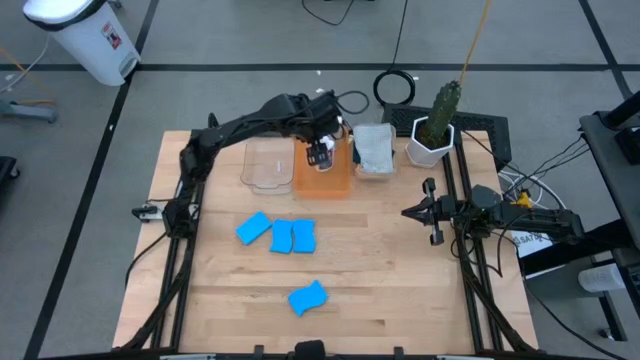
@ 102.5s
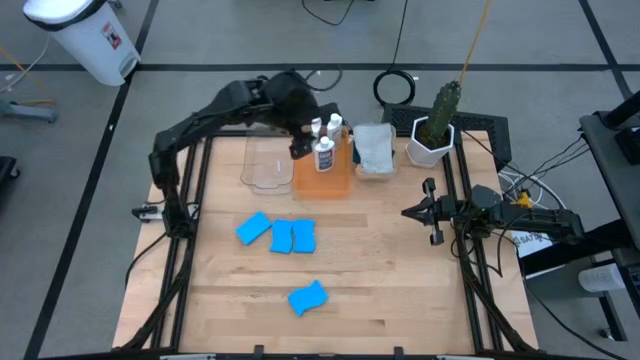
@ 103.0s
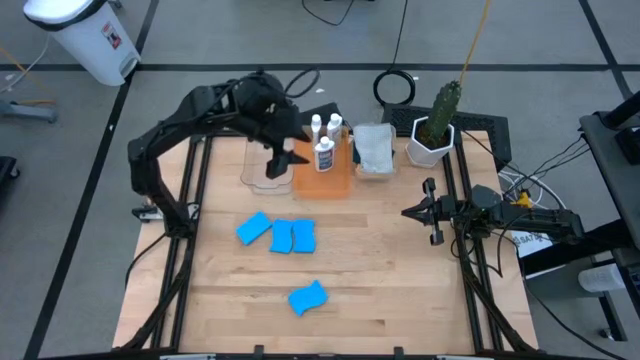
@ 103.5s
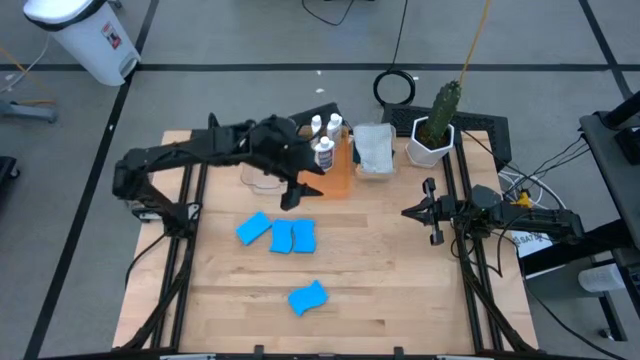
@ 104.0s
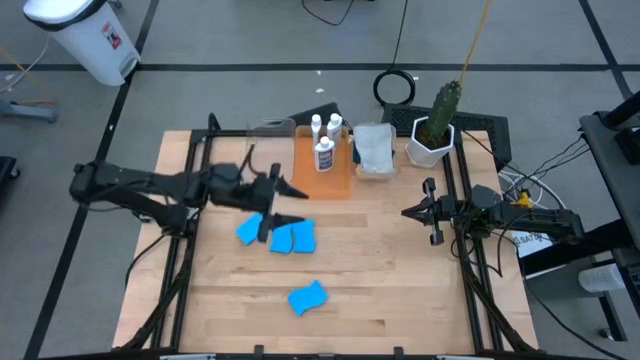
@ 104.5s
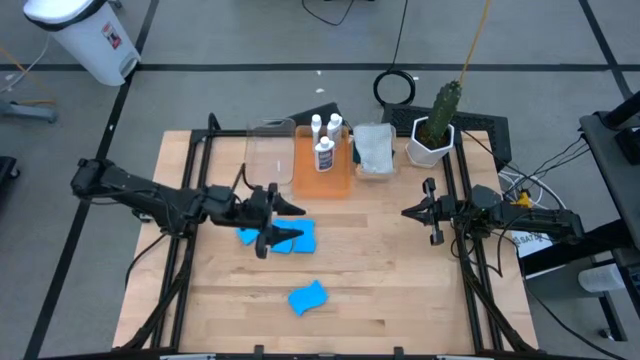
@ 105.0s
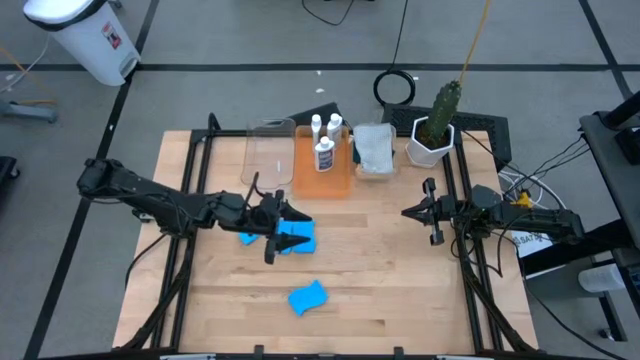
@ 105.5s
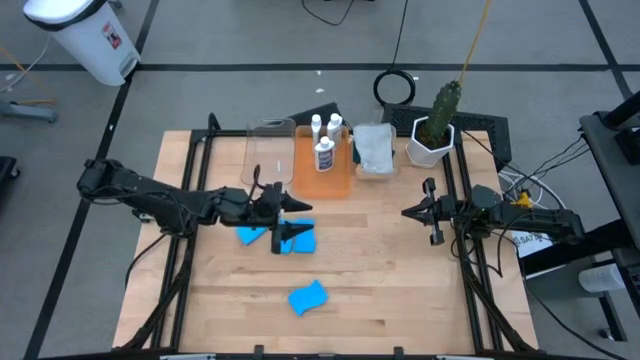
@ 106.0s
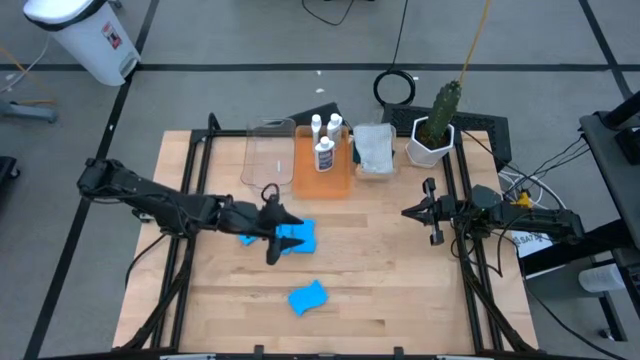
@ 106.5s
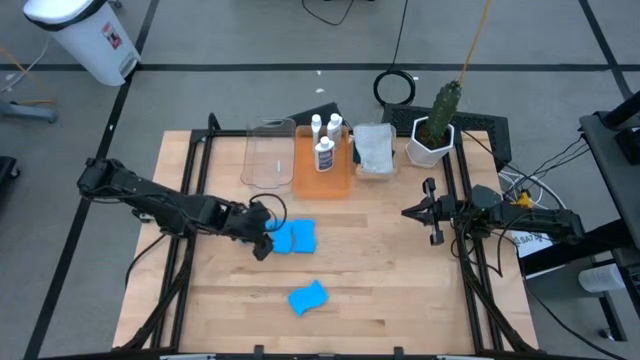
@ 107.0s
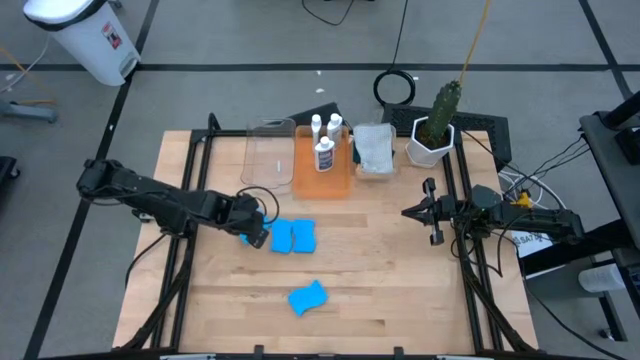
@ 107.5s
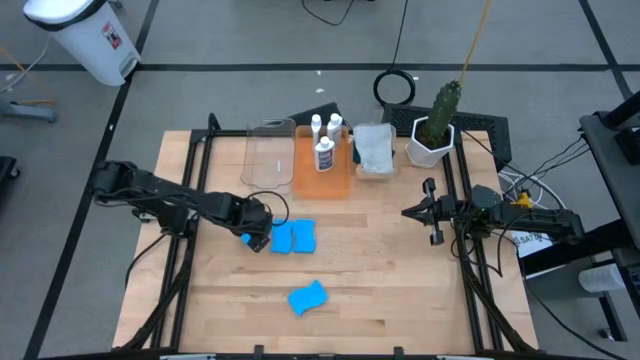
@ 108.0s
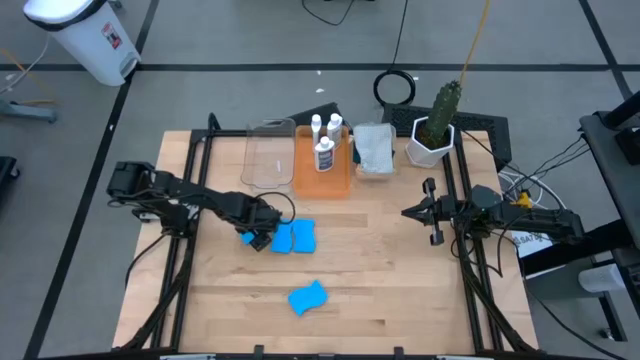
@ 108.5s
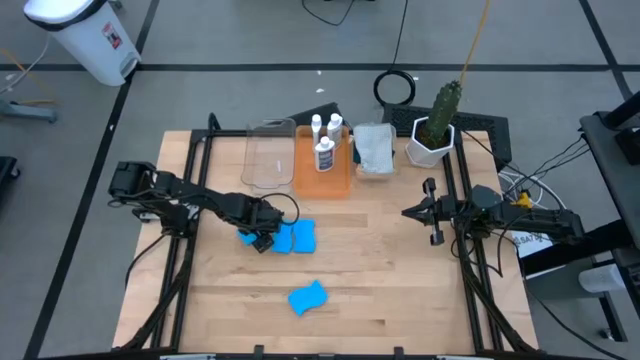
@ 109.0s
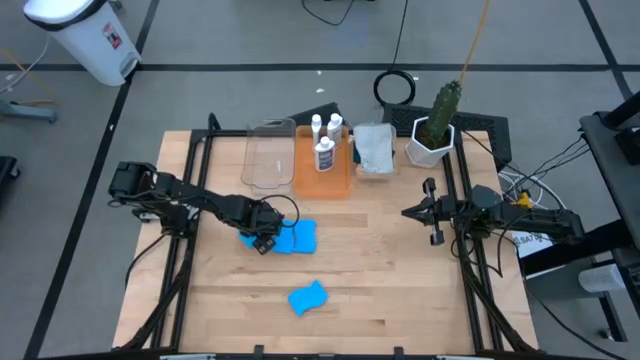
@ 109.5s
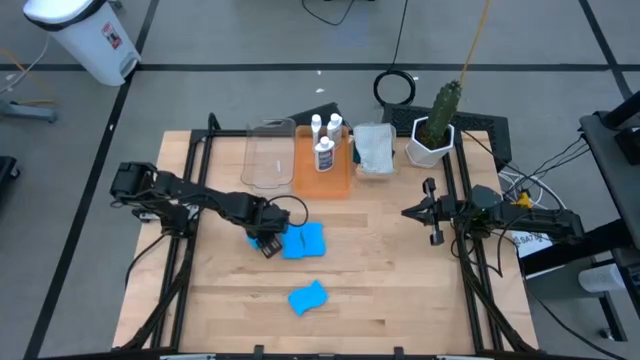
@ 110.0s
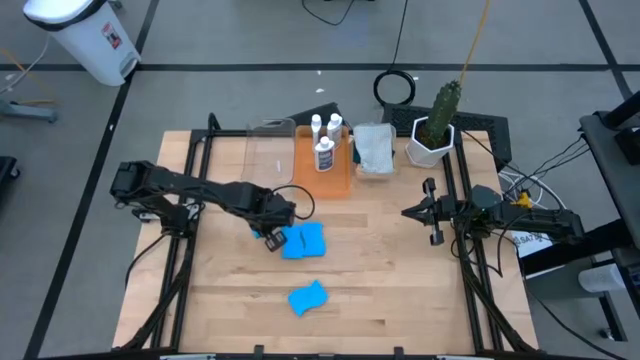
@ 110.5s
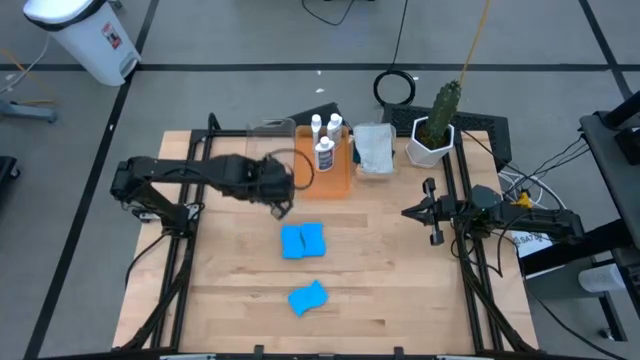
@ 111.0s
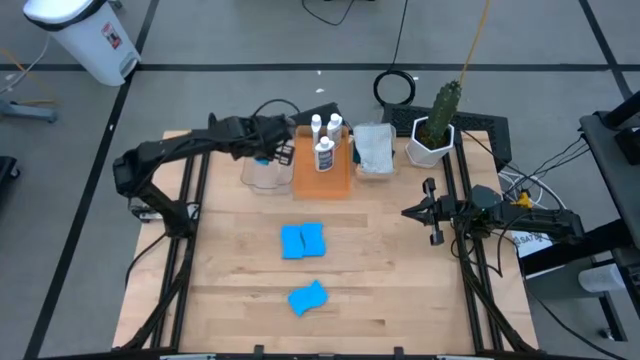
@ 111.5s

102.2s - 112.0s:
Task: Pick & Place Kitchen Items
Put the blue sponge into the transparent bin

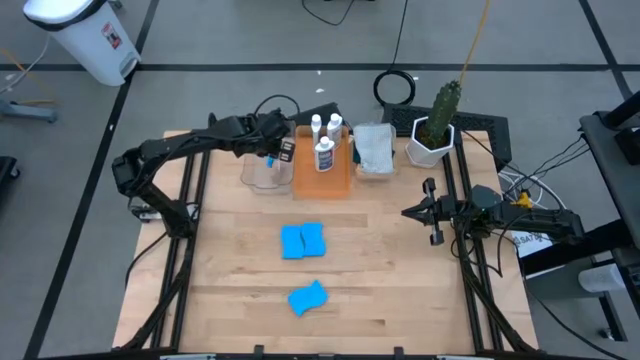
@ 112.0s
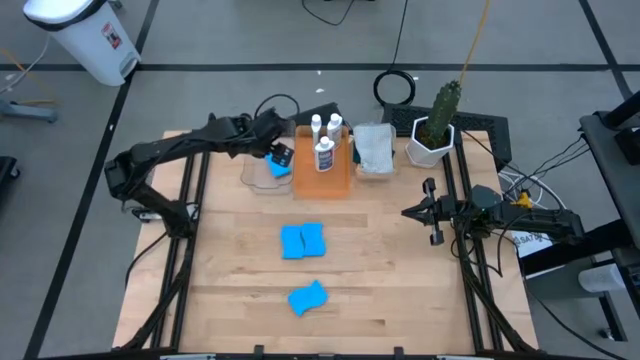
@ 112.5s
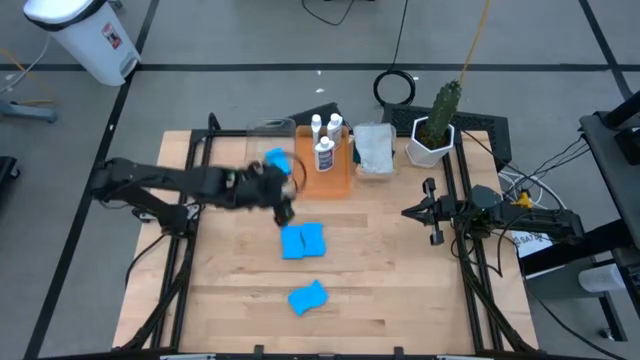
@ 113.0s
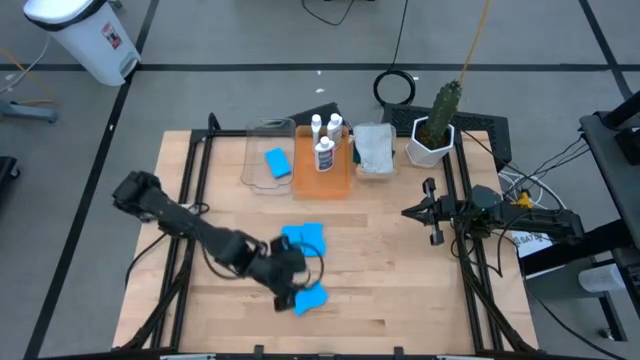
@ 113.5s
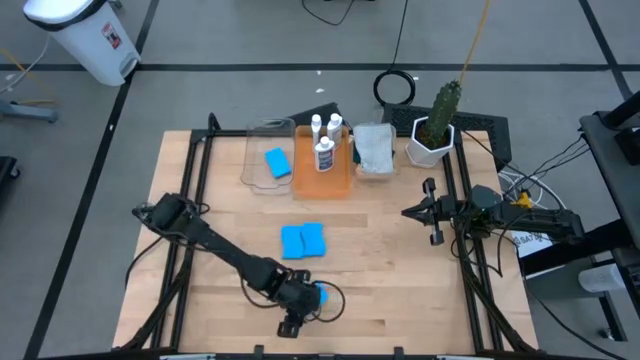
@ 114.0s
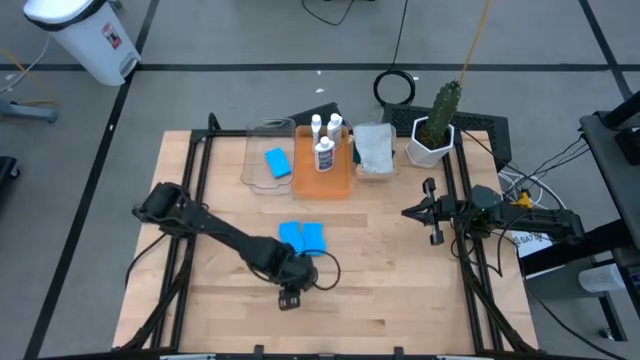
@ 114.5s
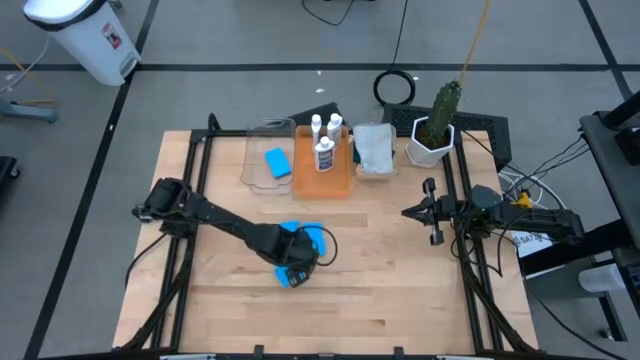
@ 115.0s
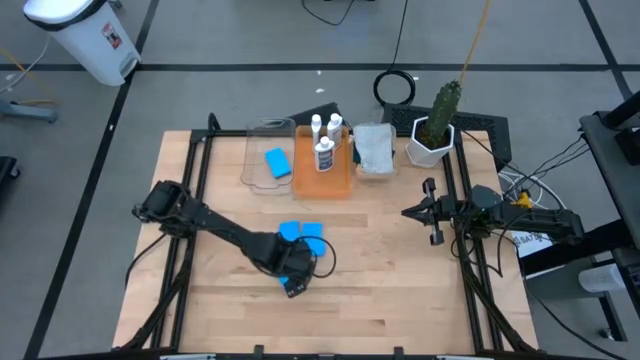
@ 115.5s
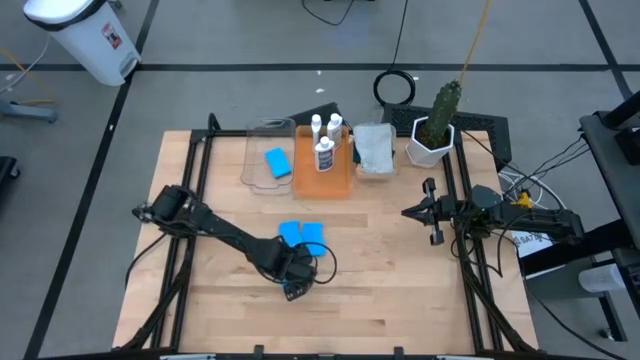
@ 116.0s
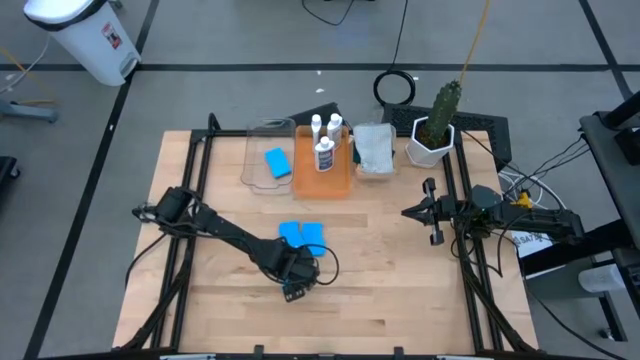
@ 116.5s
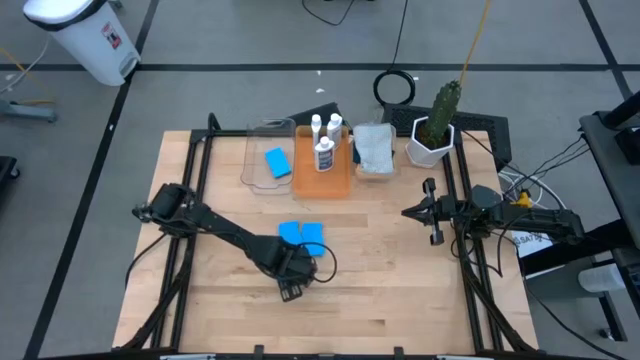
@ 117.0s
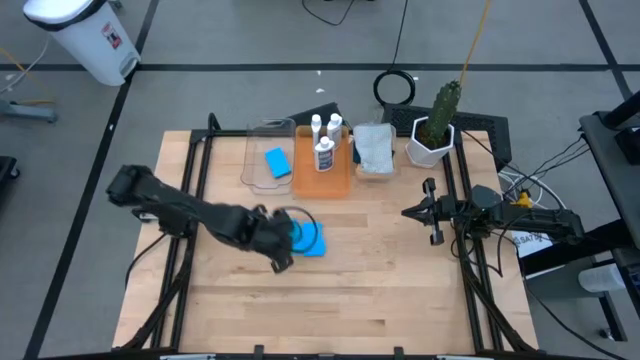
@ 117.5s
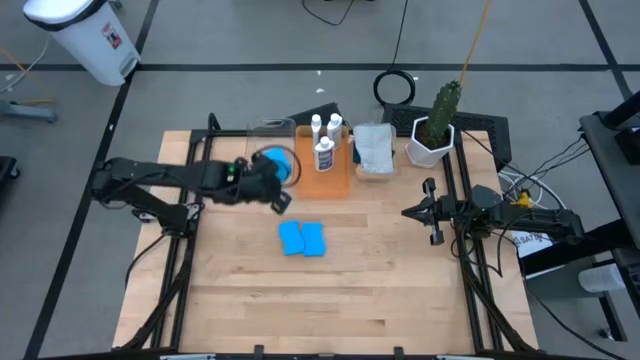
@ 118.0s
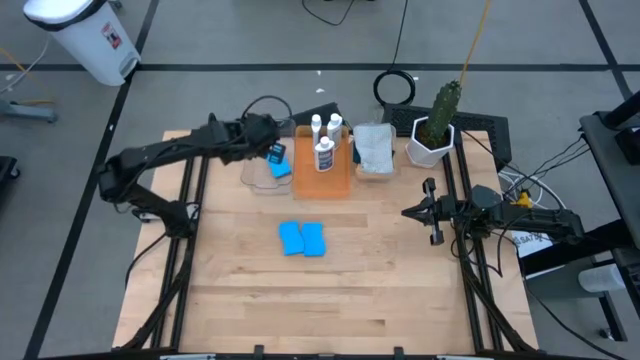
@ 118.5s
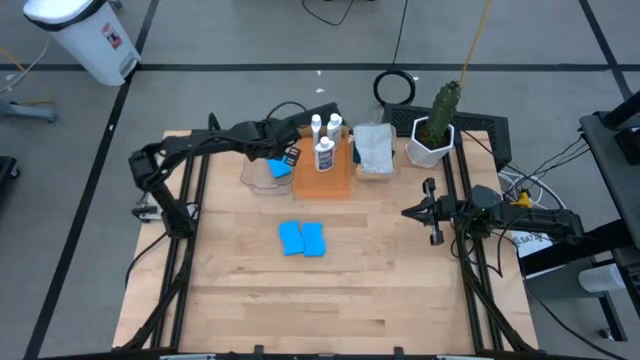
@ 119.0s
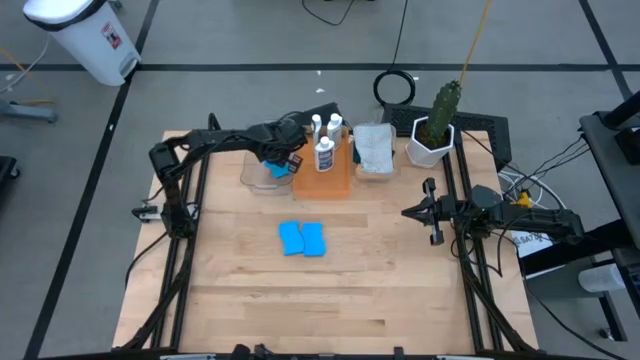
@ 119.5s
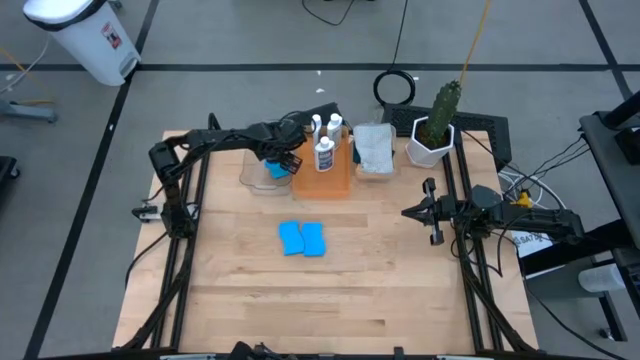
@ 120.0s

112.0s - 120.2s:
Put the blue sponge into the transparent bin

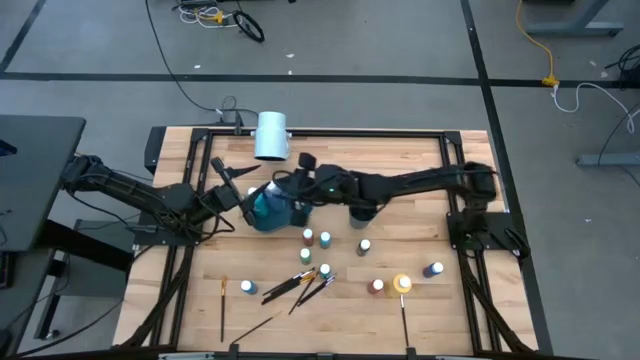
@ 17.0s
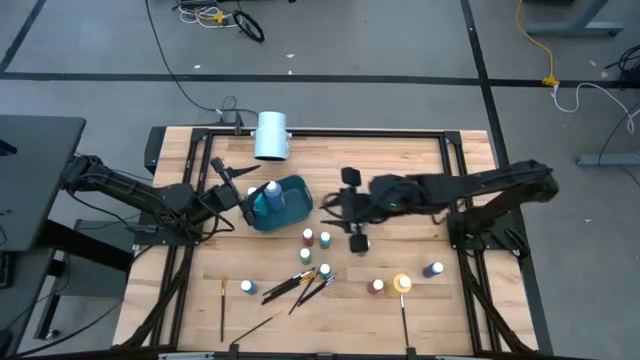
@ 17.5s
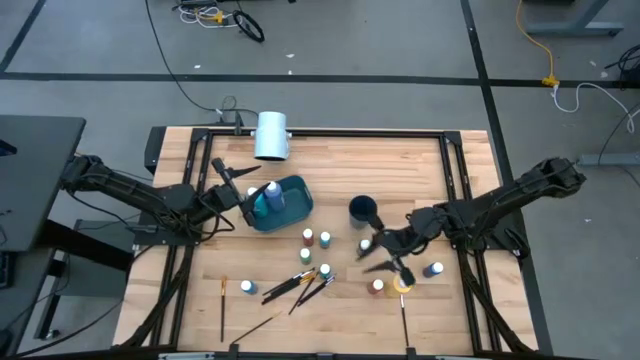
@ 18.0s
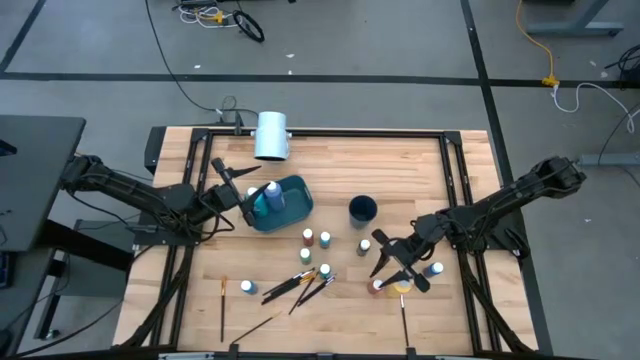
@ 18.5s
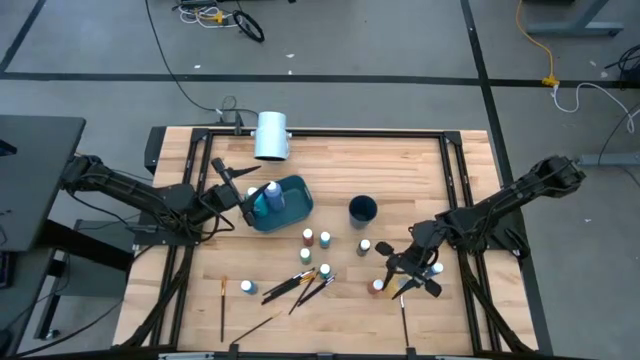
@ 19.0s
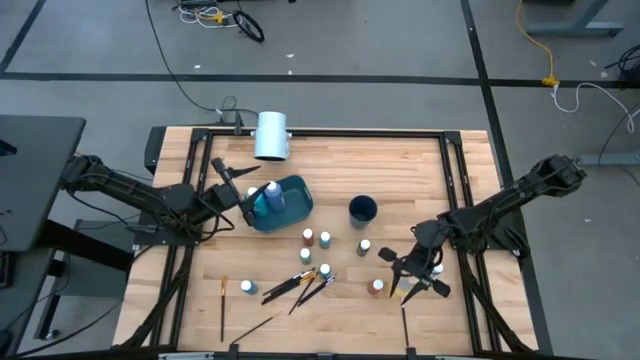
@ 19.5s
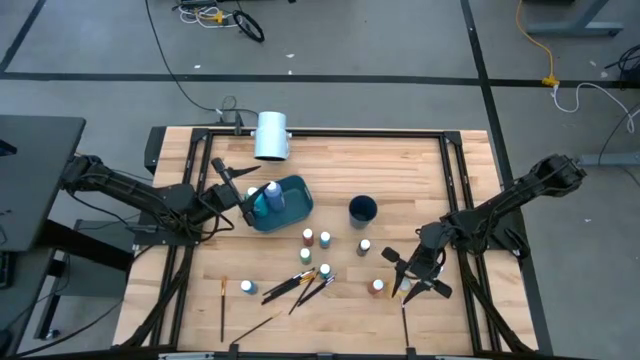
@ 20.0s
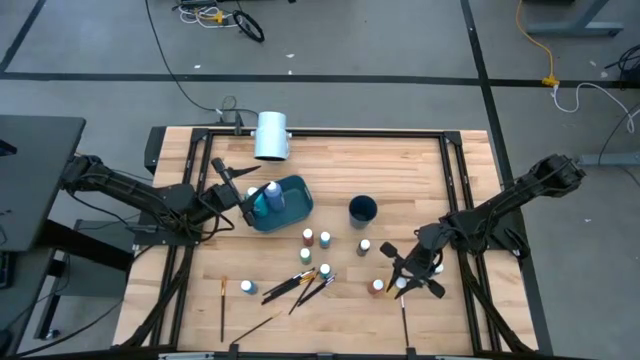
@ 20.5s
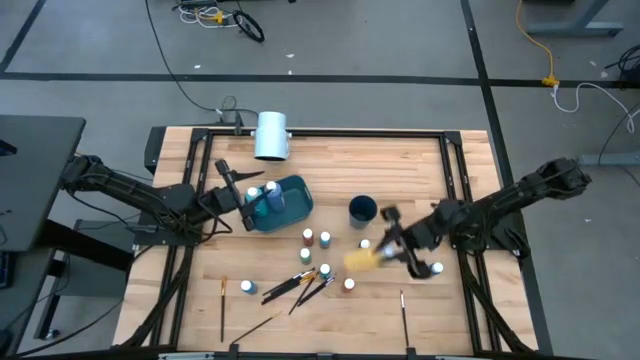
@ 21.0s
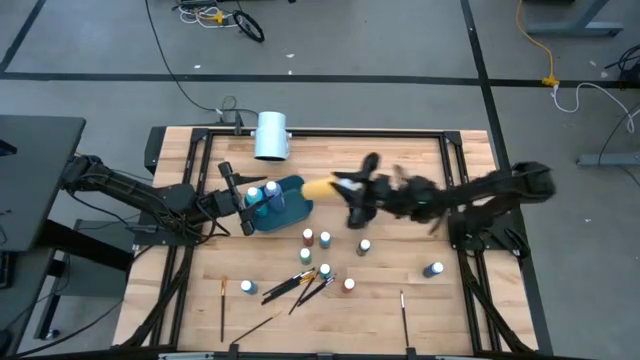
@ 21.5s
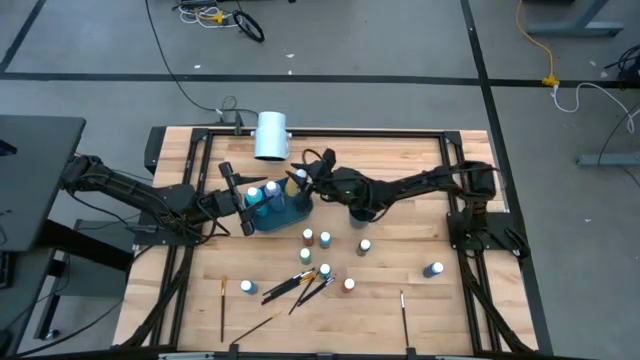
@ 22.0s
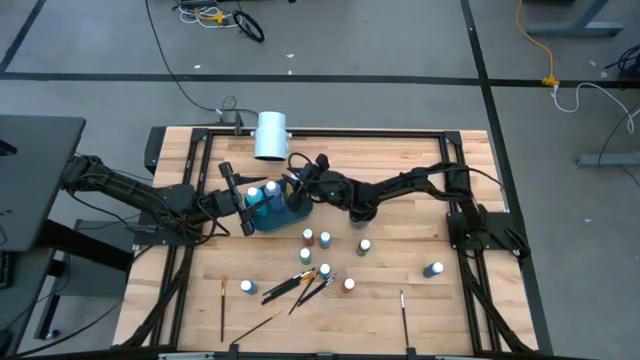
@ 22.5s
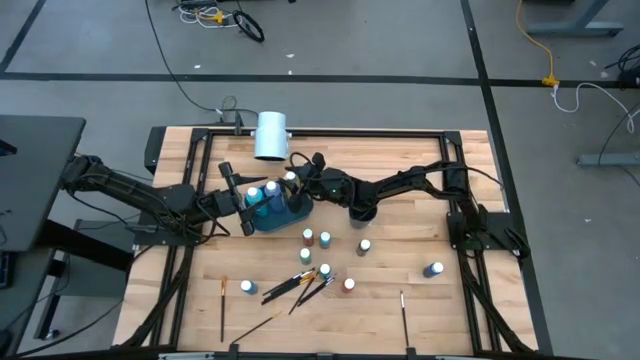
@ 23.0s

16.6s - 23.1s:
Task: Pick & Place Paint Supplies
Put the large yellow paint bottle into the blue bin
